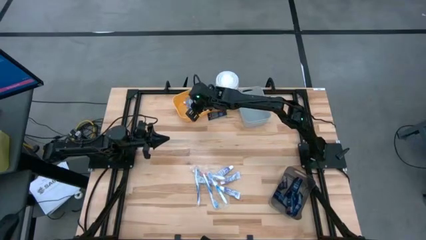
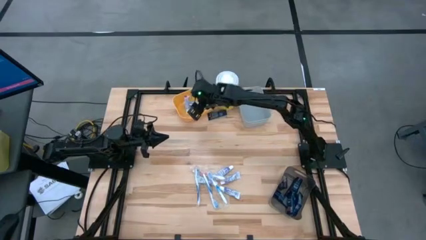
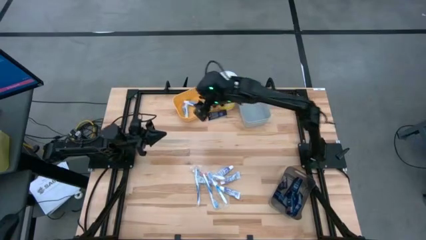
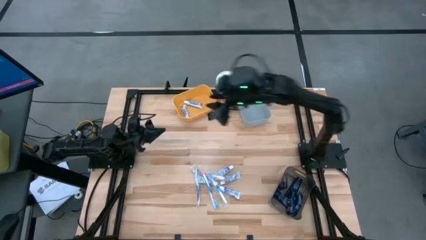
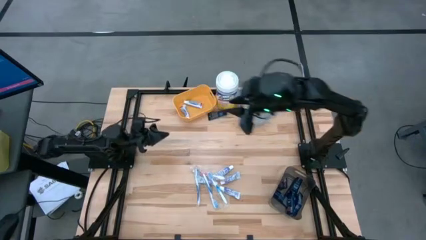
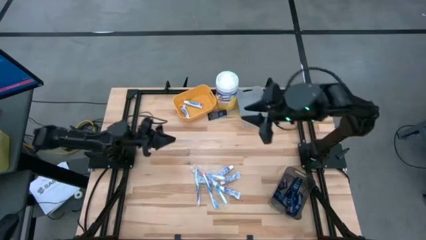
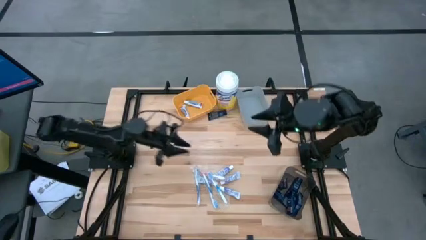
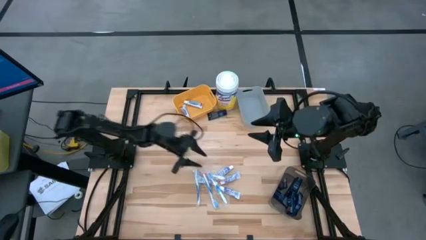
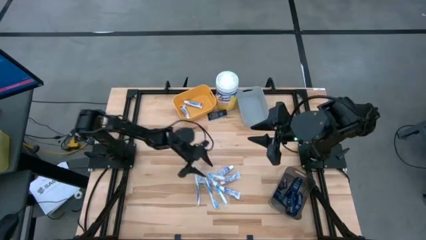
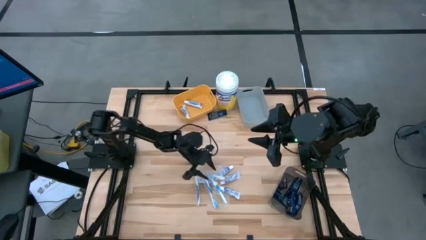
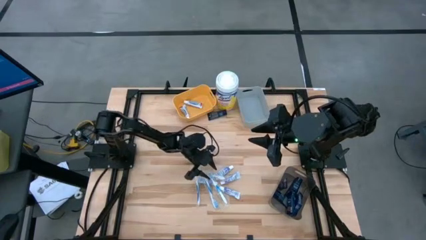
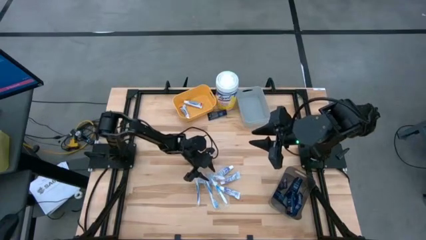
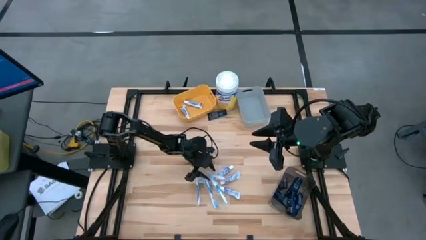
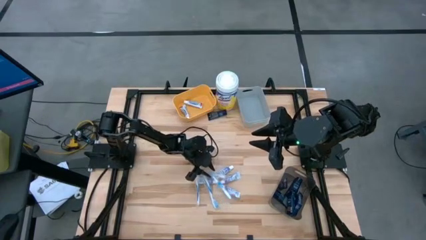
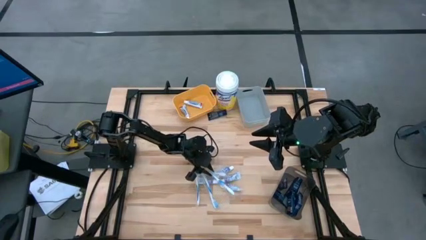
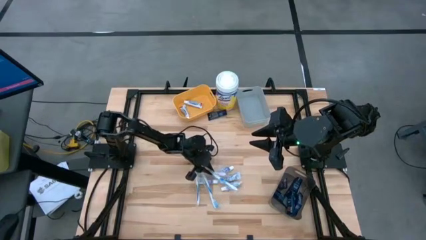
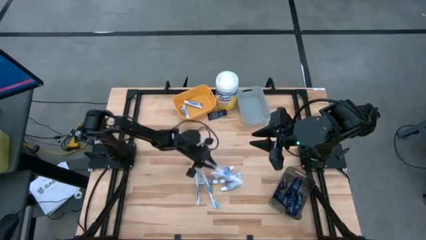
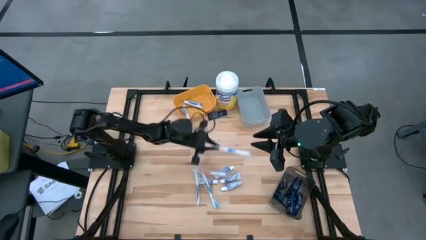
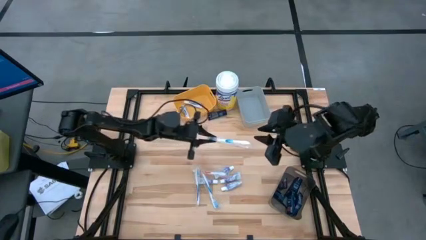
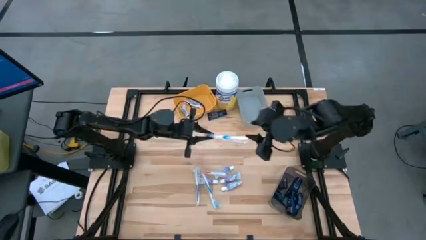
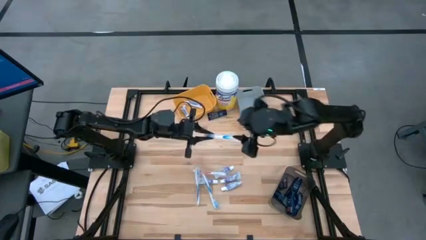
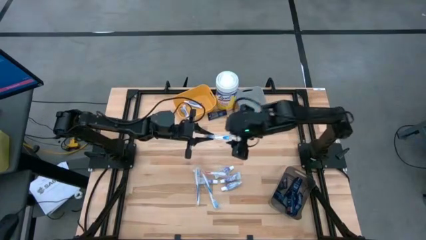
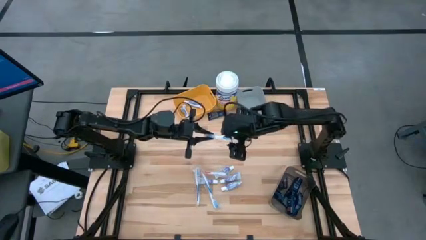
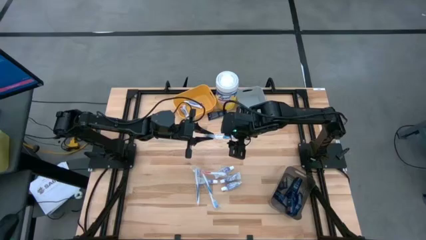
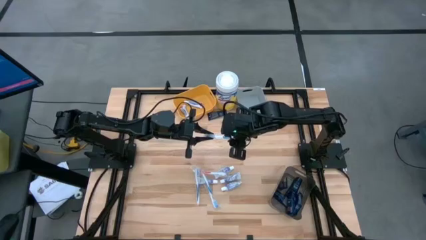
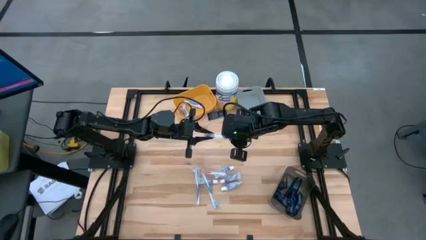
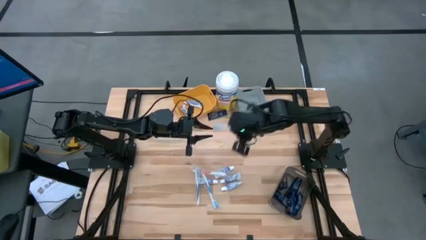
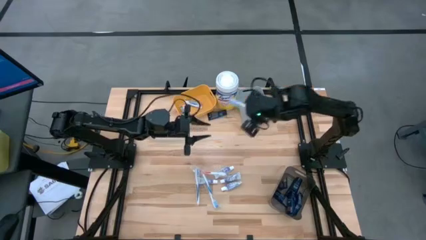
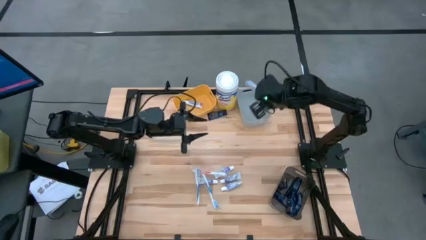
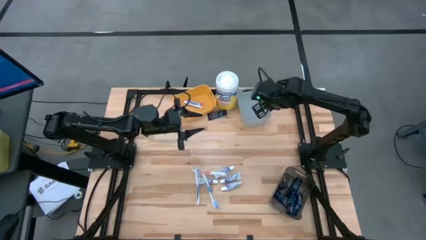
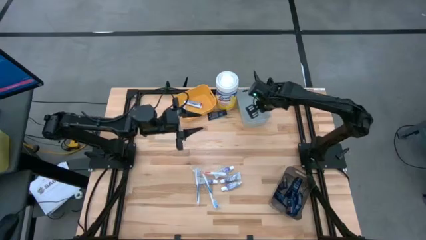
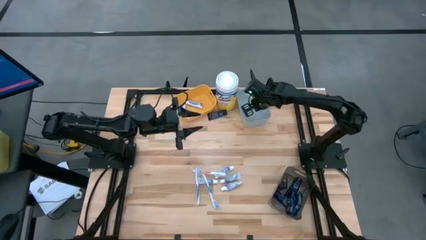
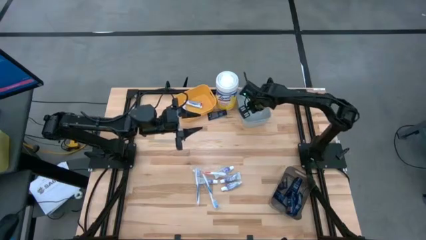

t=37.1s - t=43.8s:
Task: Pick & Place Travel size toiletries
Put the blue toothbrush into the gray bin

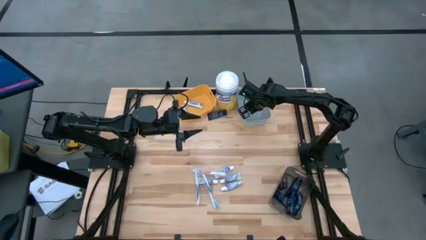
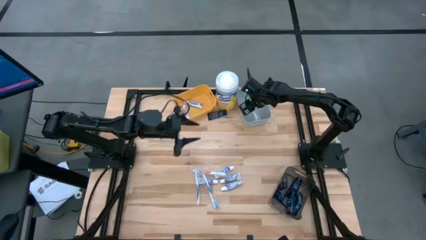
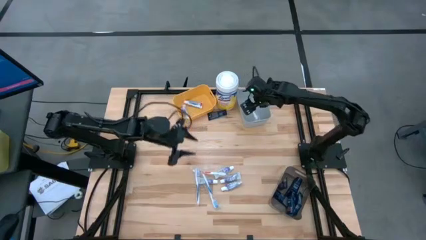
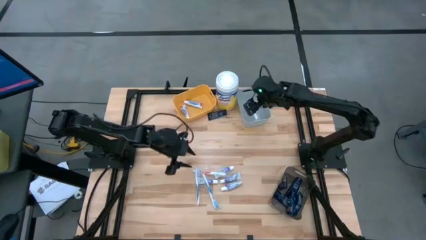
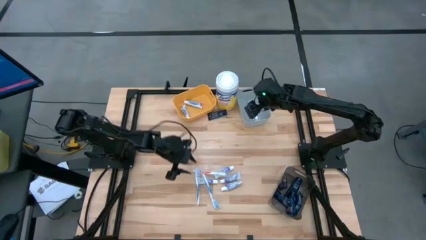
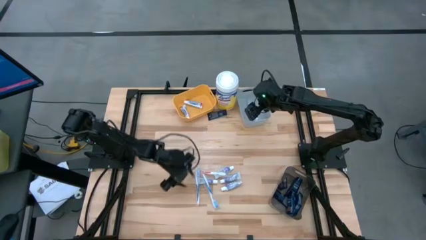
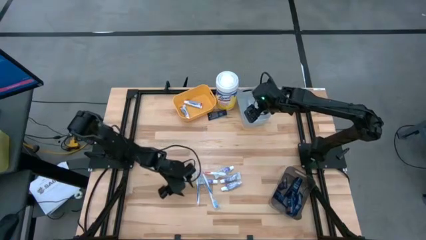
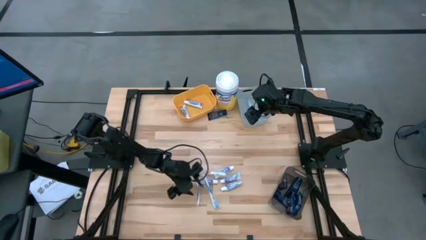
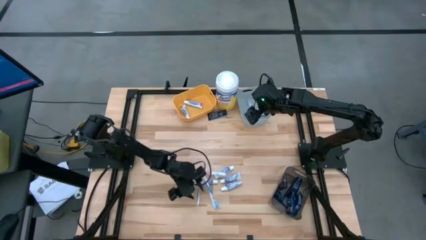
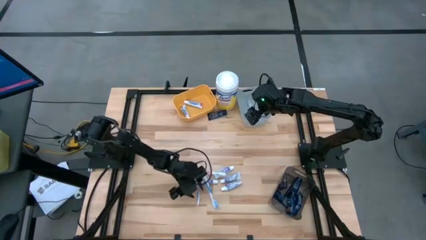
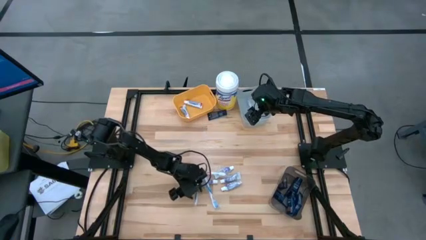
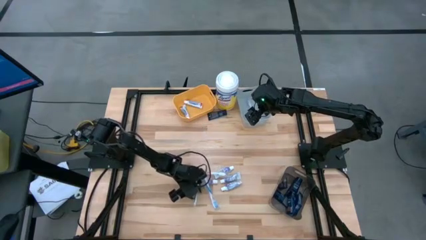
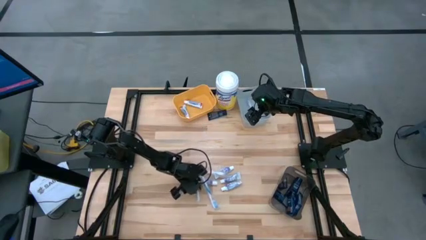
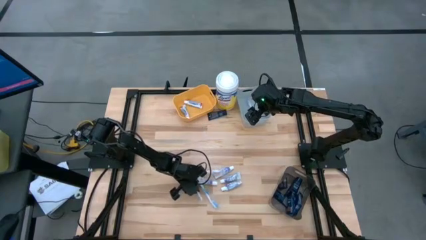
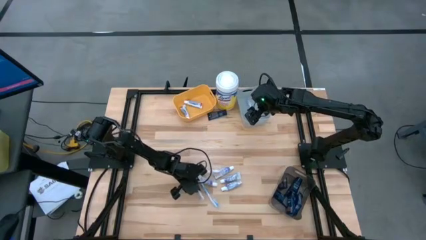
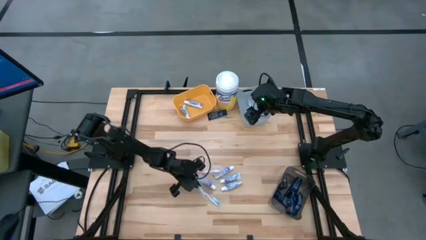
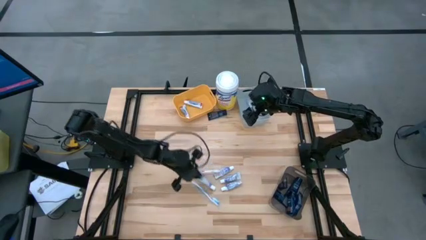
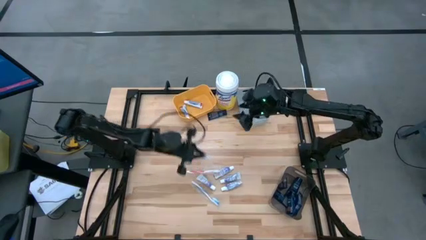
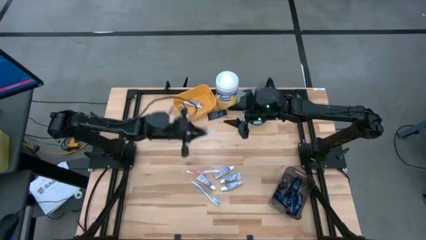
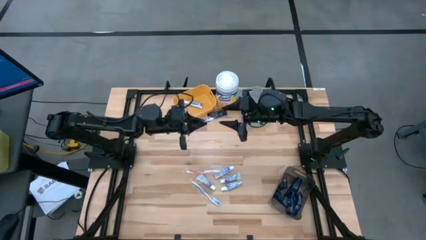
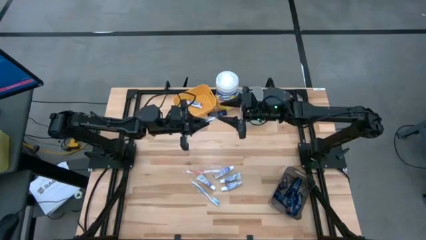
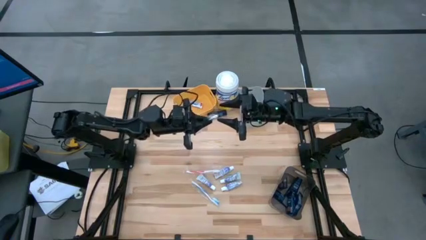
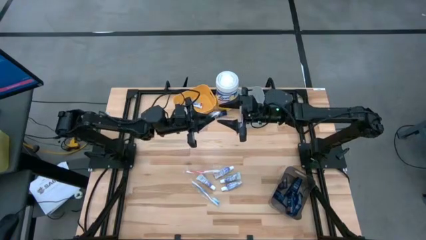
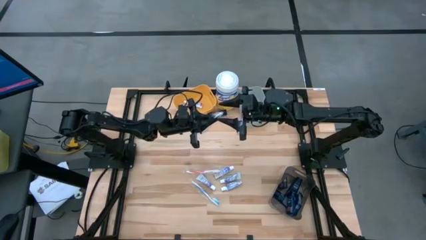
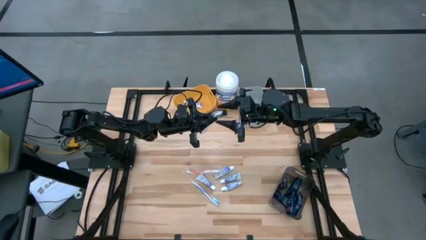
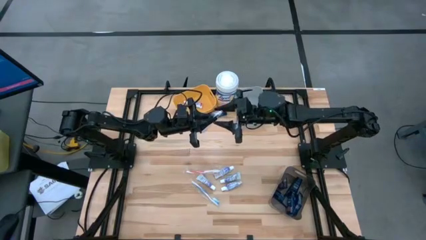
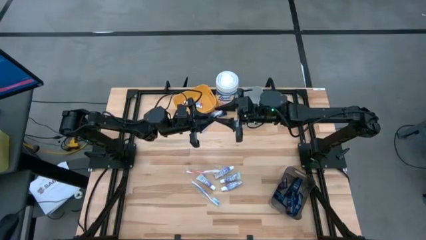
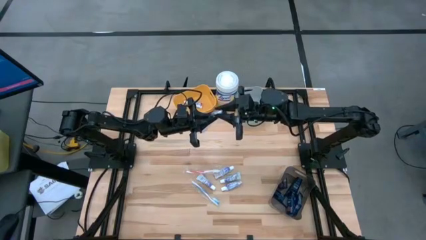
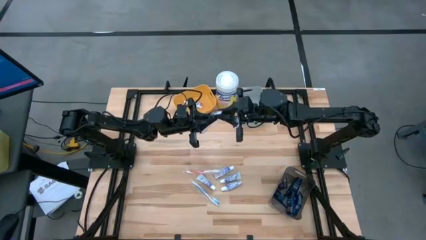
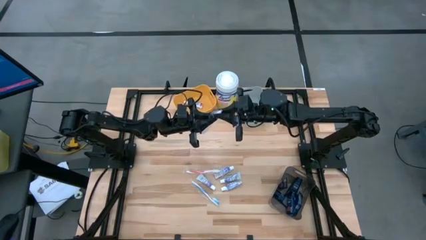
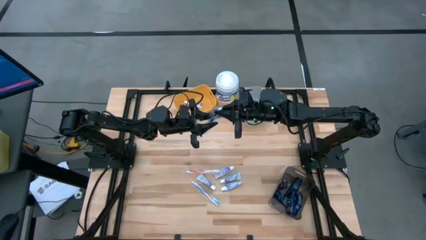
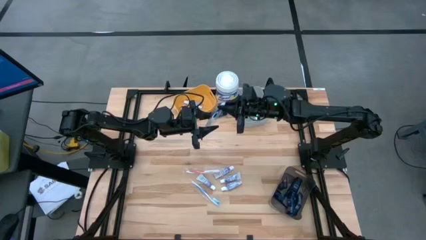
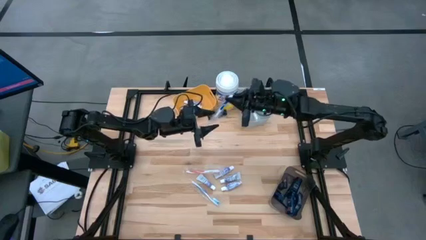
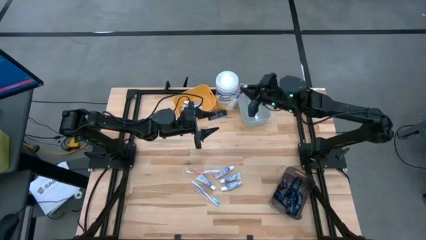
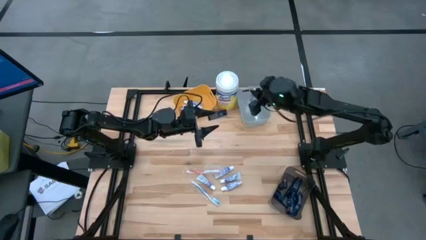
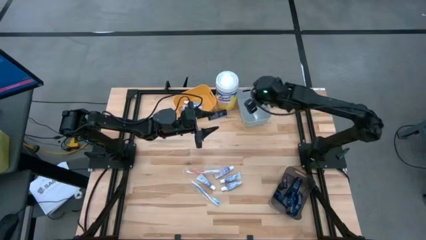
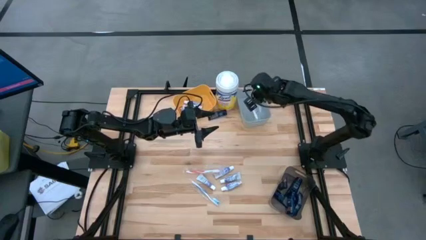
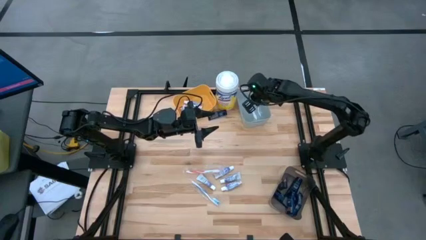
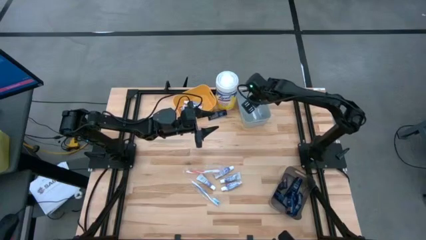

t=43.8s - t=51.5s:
Put the dark blue toothbrush into the gray bin

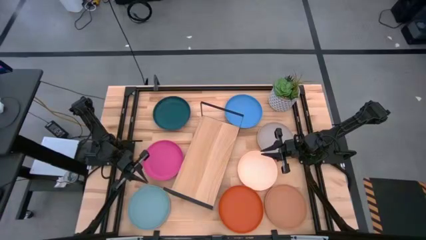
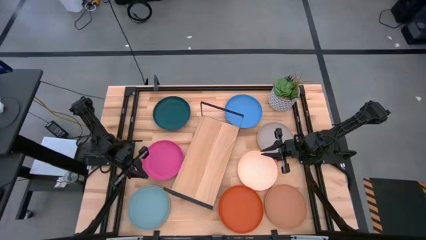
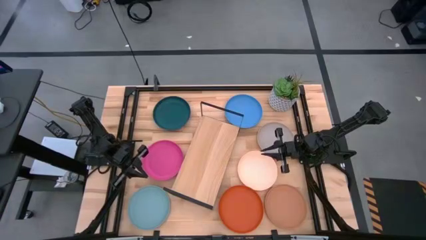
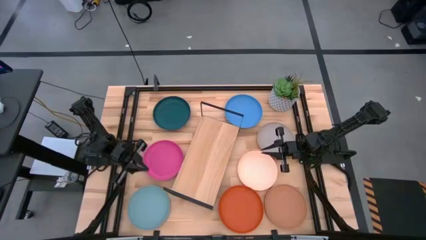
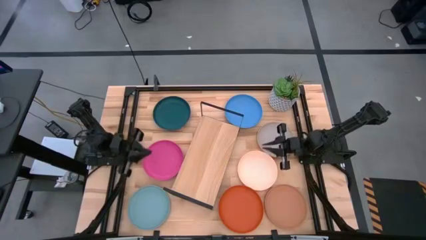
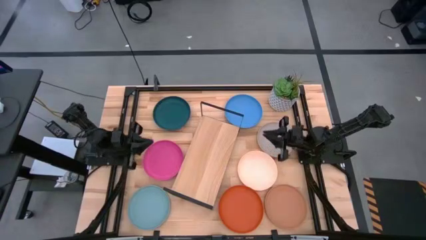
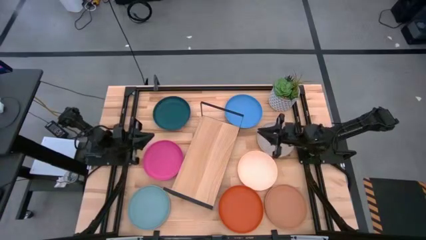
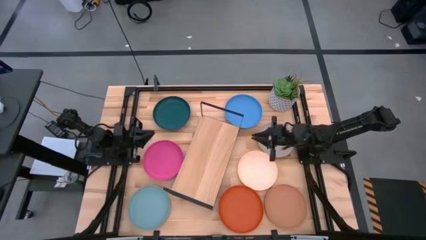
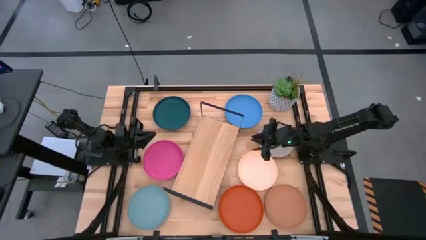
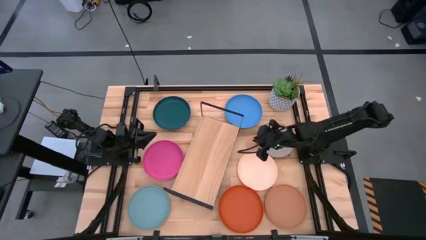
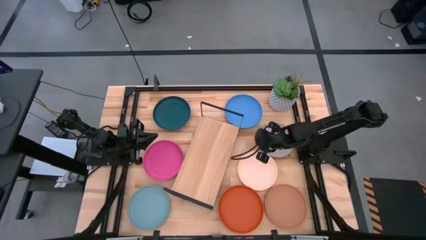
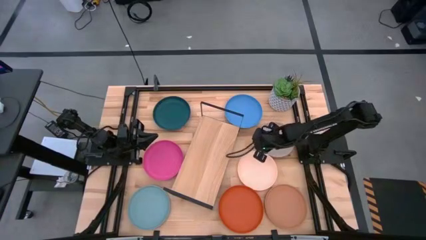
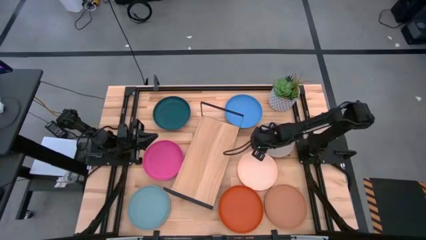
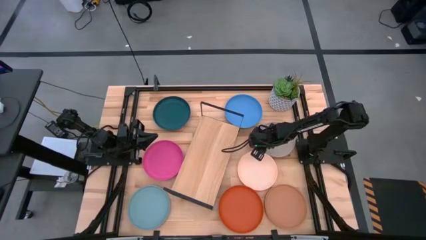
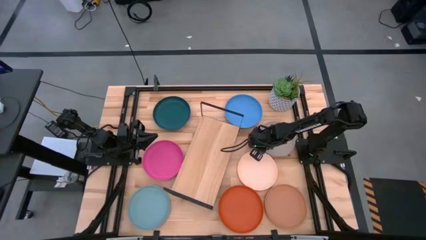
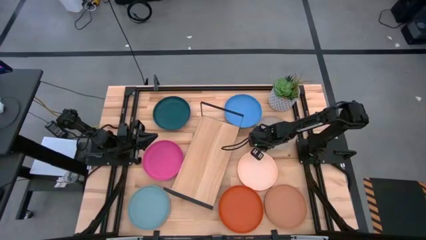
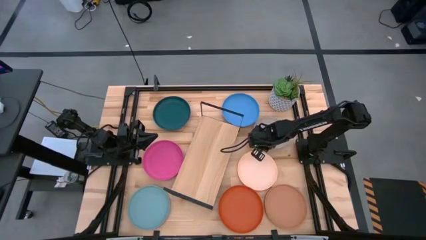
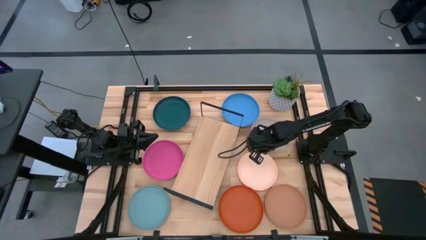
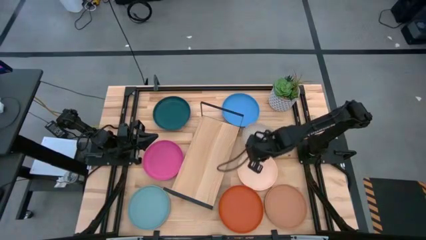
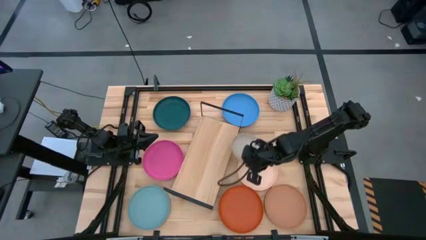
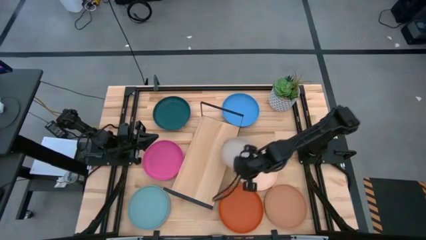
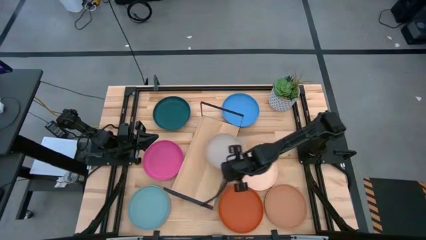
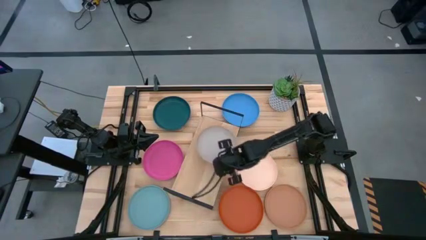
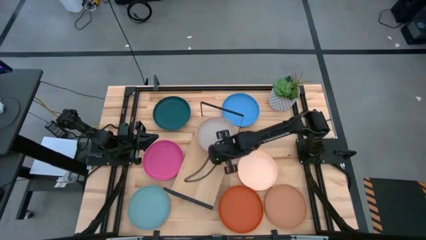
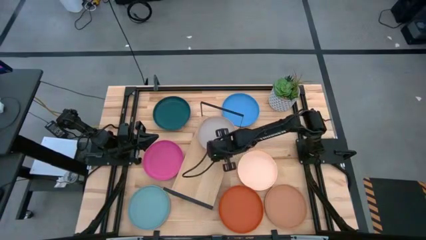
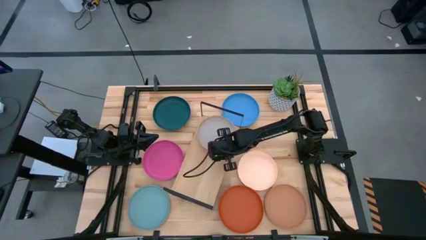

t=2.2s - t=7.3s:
Task: Place and stack plates onto a shelf
Put the gray plate on the shelf
